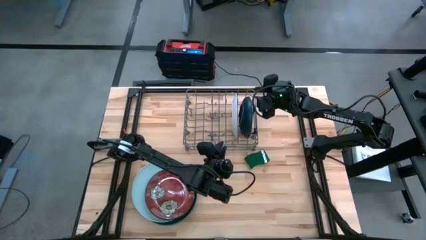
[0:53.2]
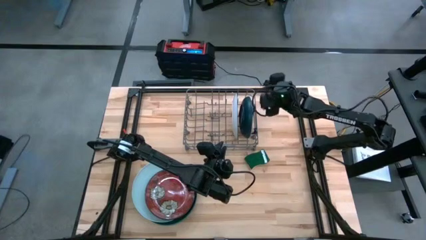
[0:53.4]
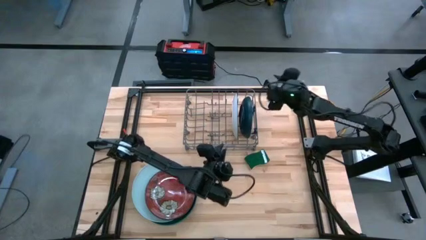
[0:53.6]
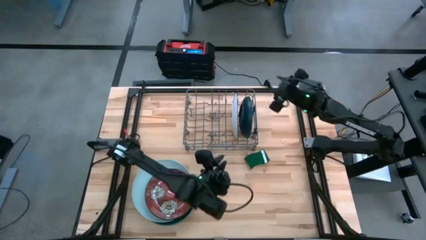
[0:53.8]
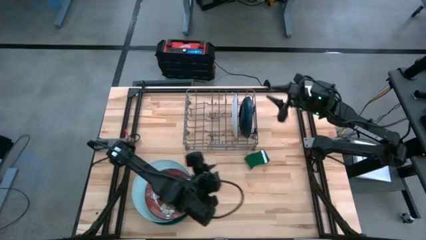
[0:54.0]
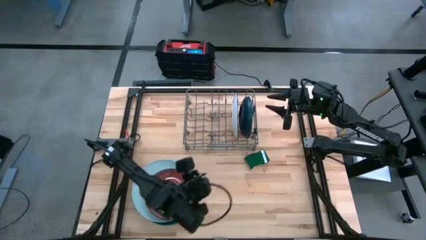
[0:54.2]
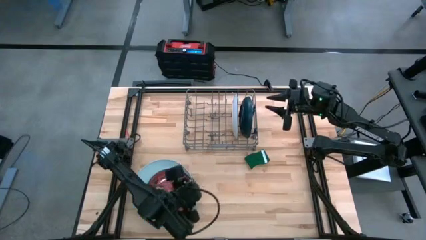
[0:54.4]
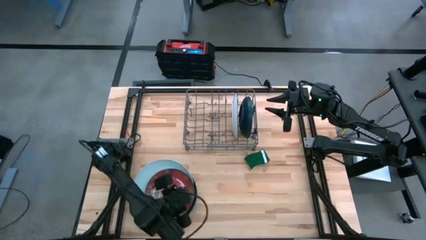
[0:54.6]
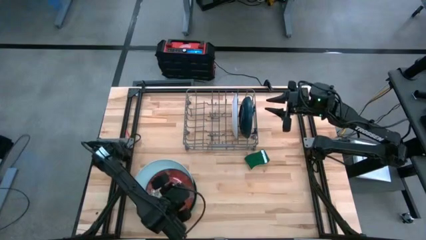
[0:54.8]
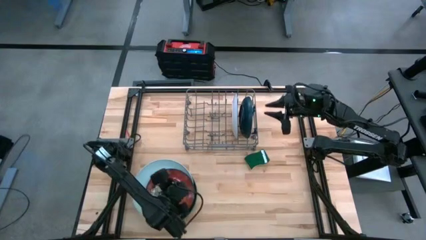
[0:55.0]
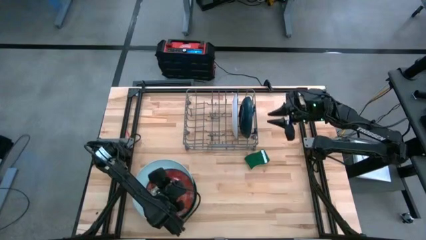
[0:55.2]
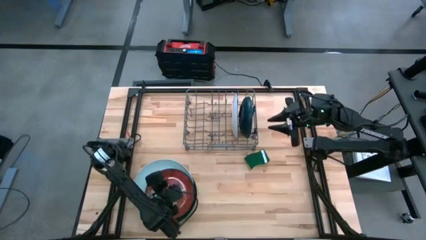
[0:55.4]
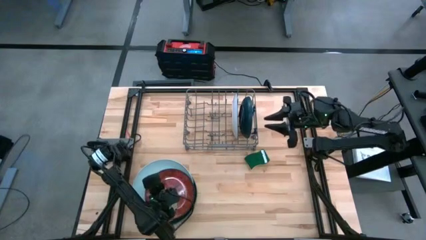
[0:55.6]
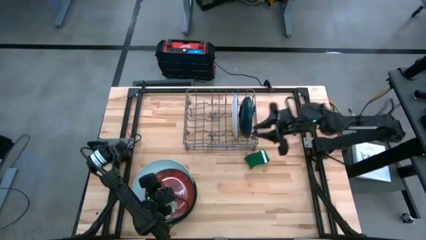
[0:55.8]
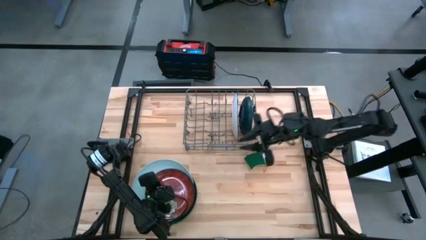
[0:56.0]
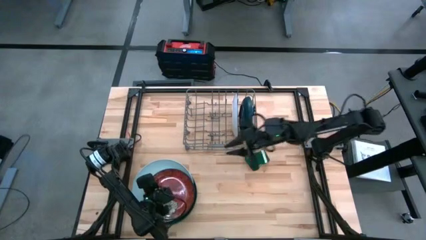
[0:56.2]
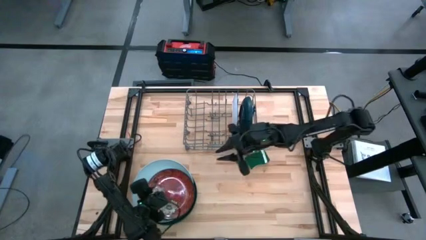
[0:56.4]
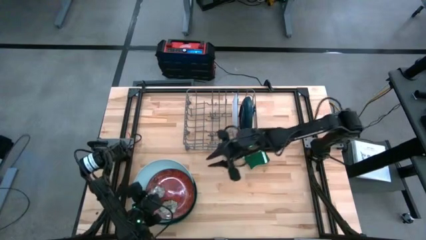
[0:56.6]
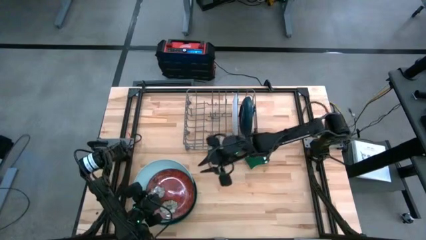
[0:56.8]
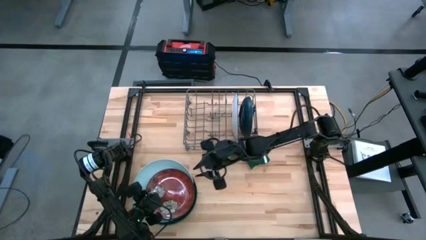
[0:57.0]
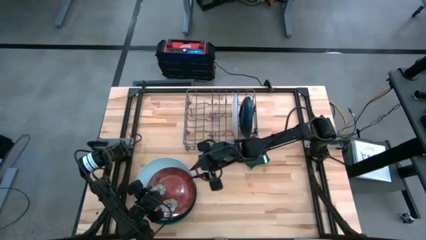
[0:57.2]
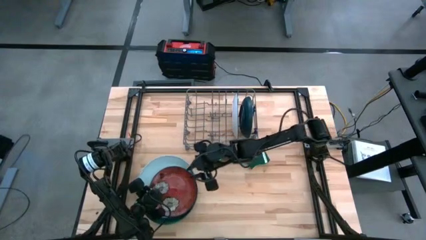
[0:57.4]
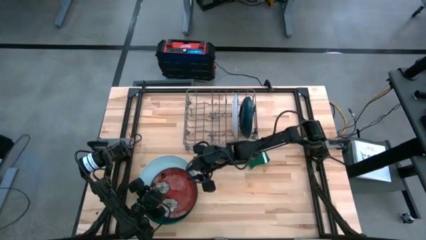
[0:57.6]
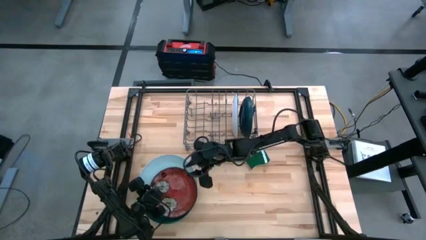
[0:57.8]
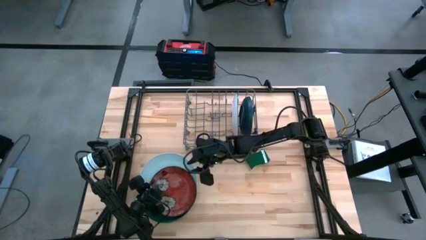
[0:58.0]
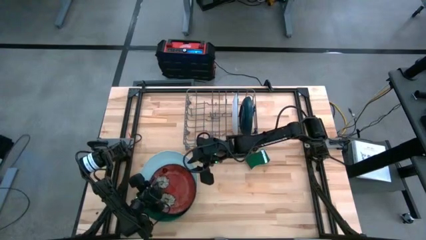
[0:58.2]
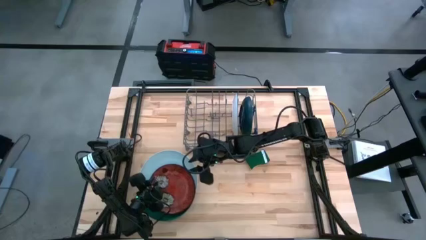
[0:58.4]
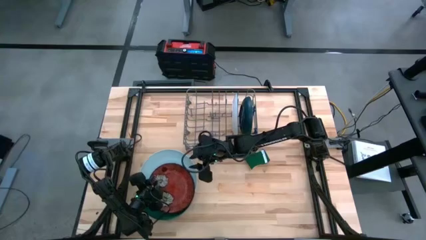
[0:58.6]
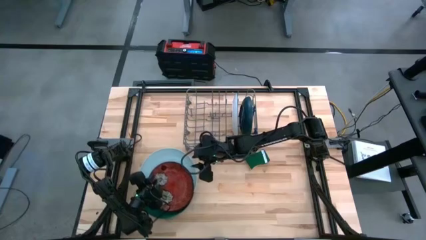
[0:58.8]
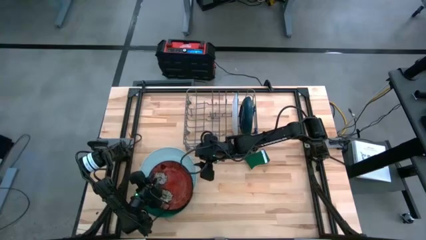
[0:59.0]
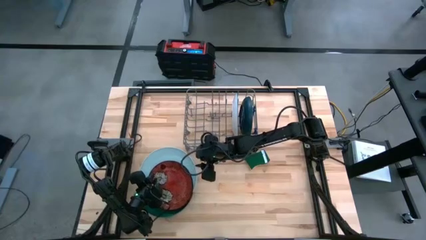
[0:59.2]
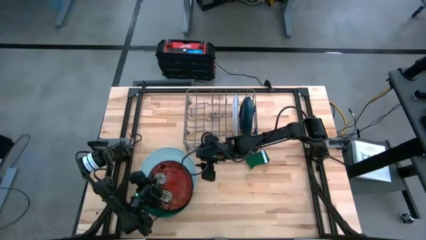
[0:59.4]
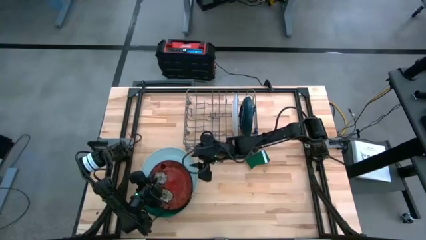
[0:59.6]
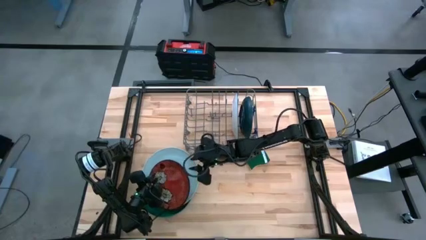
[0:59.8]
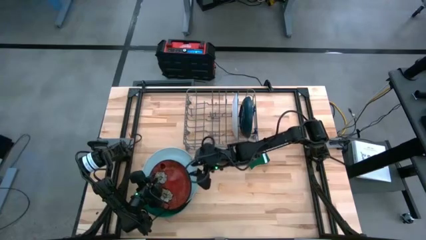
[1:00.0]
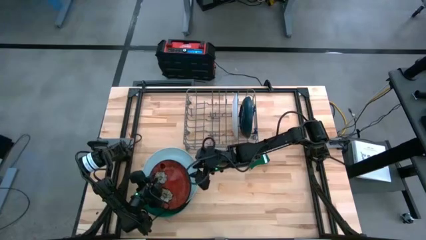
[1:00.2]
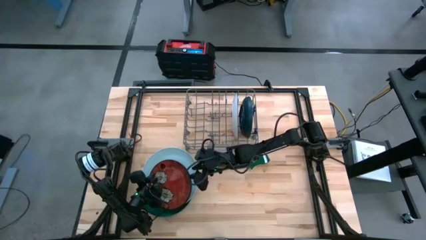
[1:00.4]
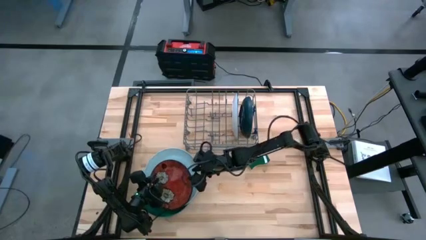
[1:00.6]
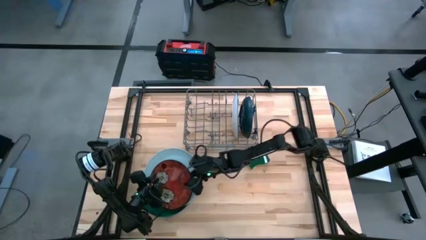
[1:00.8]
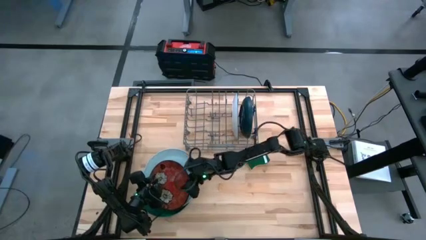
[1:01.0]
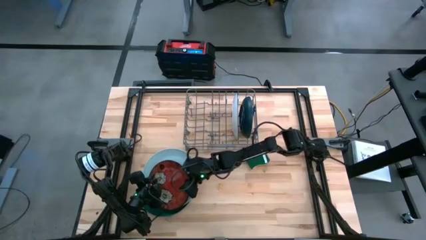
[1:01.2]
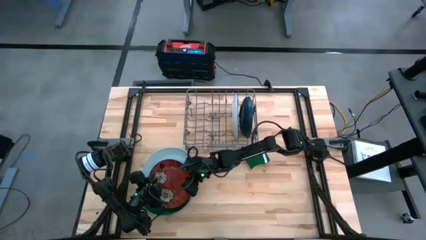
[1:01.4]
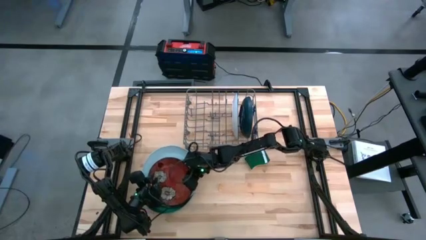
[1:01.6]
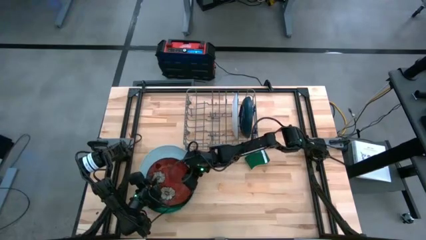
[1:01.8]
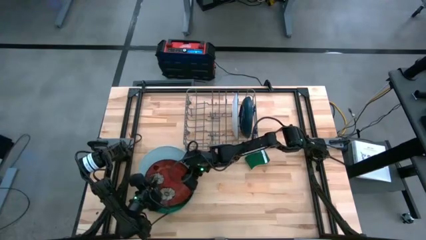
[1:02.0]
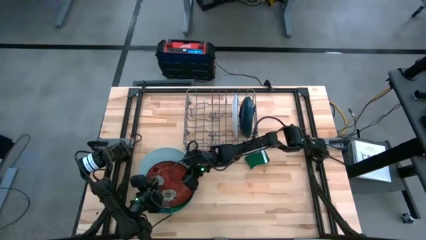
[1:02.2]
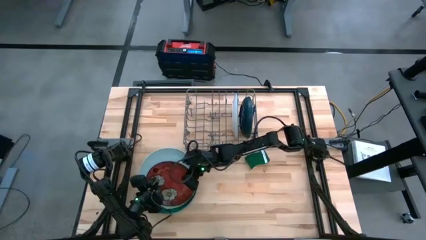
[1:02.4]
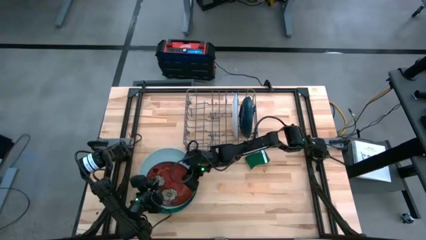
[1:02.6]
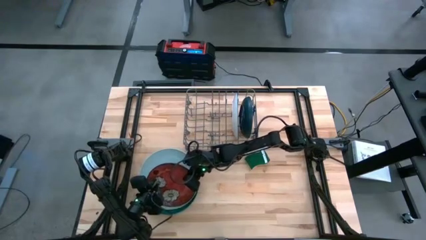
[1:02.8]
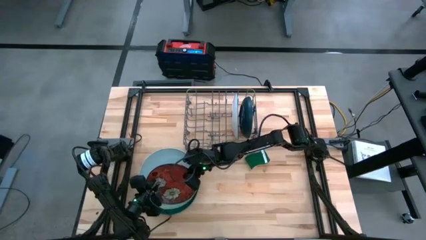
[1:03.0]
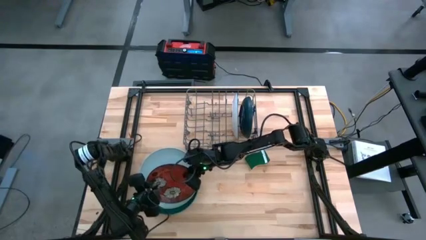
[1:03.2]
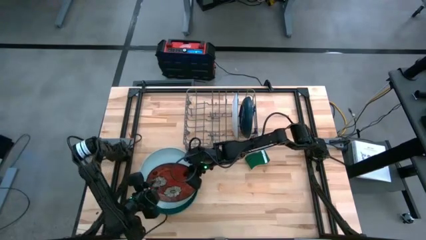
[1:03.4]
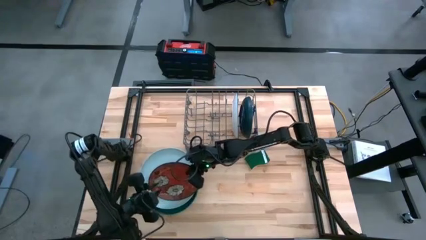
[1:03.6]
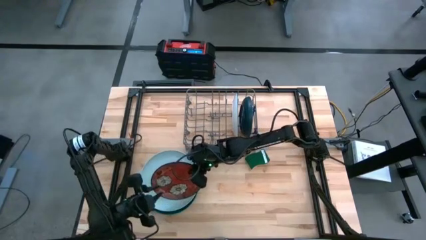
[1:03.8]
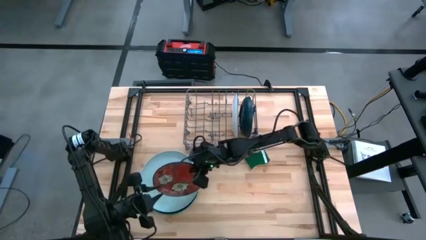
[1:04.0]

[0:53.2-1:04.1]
Task: Sort dishes
Put the red plate into the dish rack

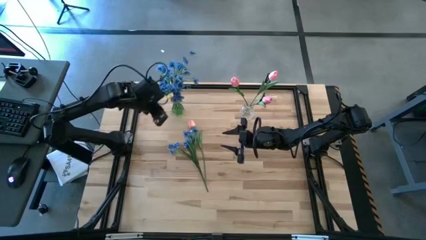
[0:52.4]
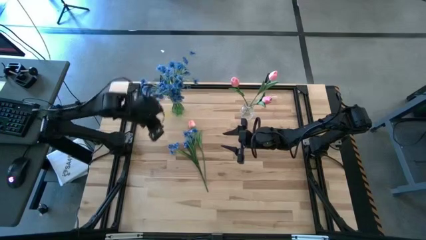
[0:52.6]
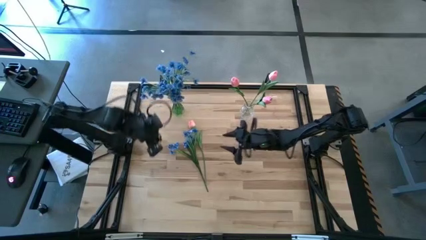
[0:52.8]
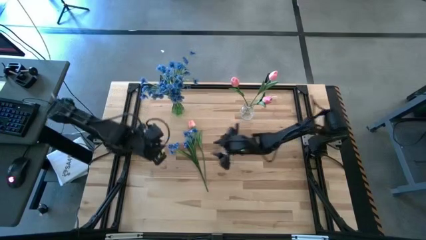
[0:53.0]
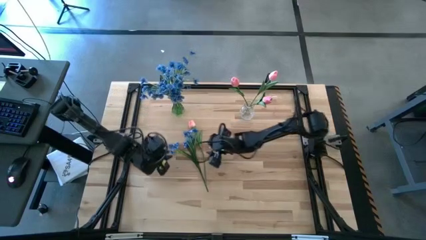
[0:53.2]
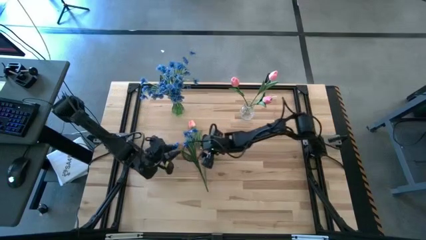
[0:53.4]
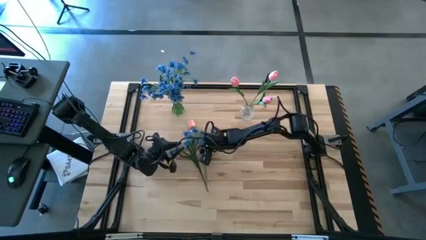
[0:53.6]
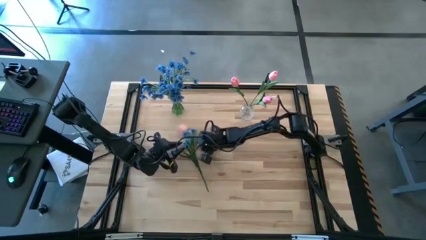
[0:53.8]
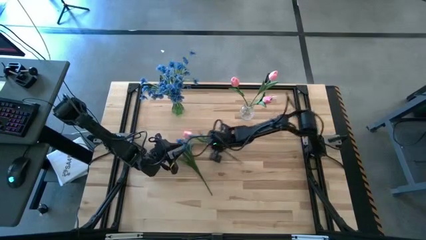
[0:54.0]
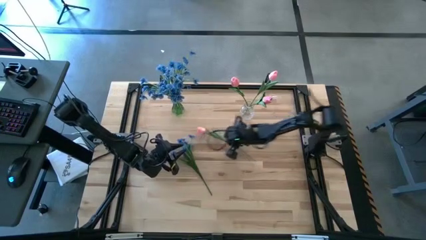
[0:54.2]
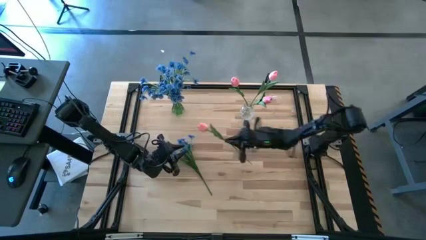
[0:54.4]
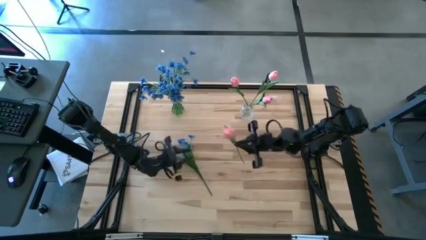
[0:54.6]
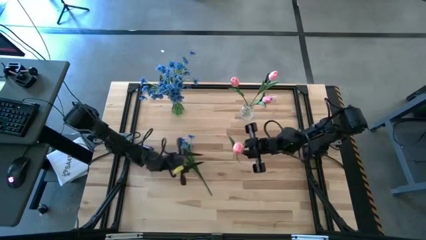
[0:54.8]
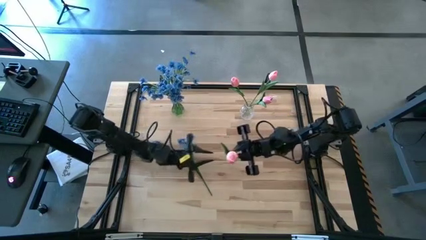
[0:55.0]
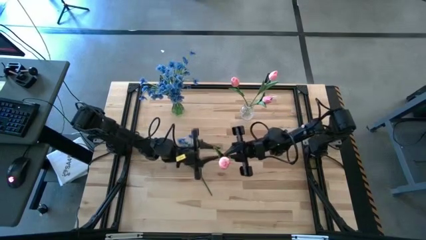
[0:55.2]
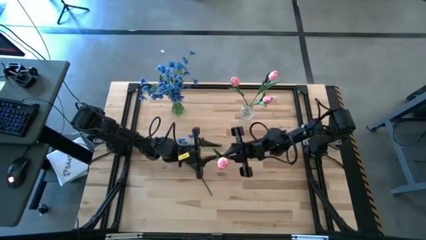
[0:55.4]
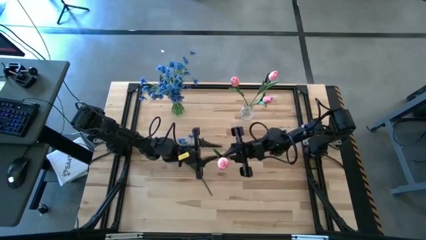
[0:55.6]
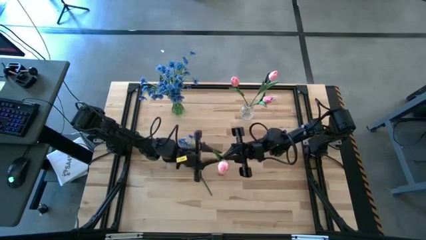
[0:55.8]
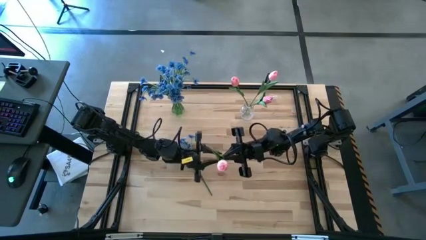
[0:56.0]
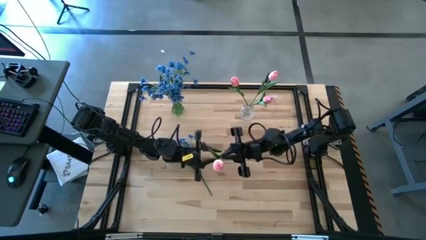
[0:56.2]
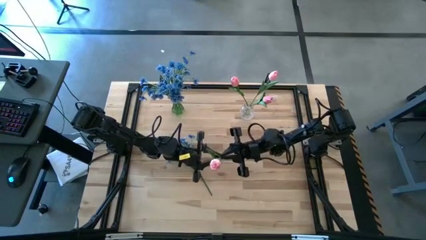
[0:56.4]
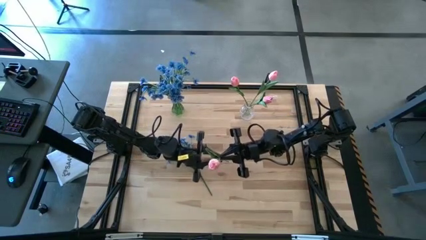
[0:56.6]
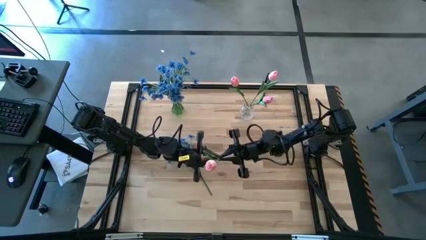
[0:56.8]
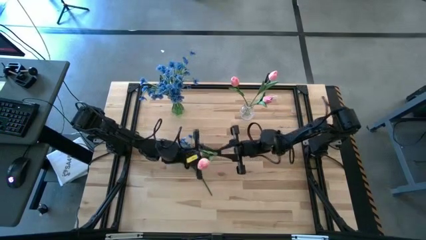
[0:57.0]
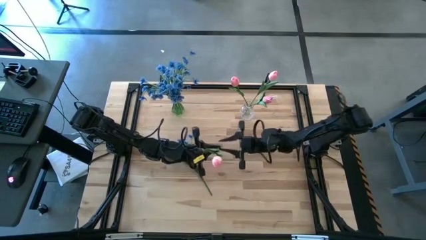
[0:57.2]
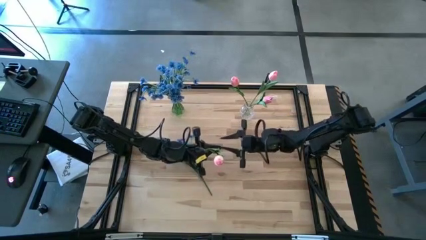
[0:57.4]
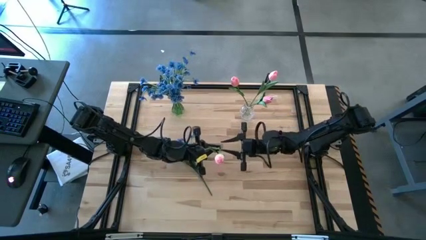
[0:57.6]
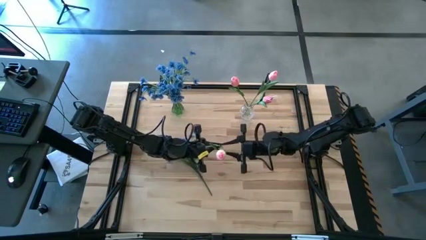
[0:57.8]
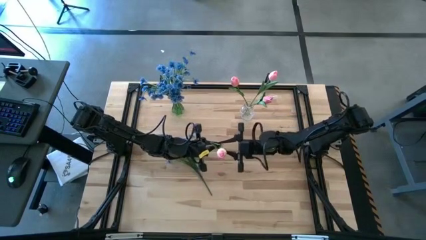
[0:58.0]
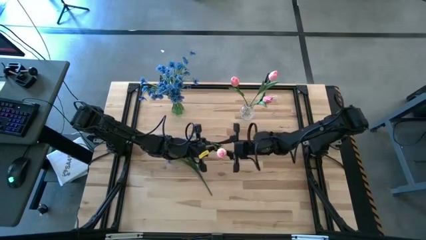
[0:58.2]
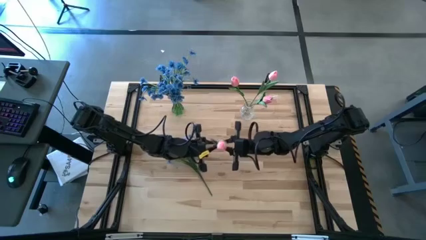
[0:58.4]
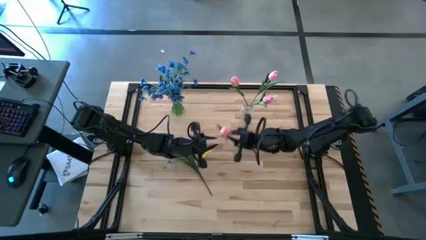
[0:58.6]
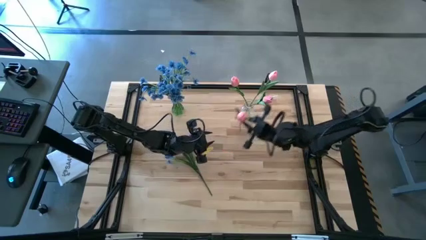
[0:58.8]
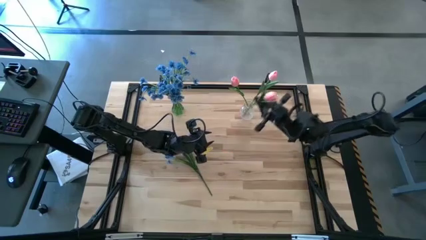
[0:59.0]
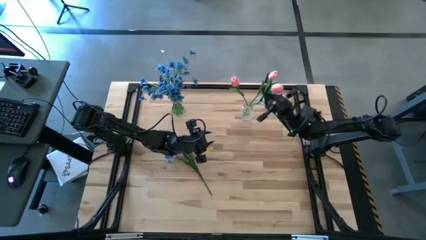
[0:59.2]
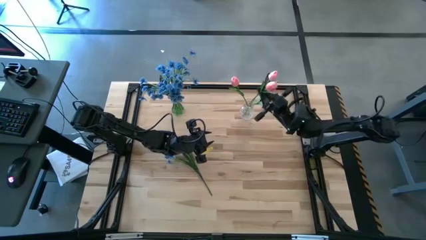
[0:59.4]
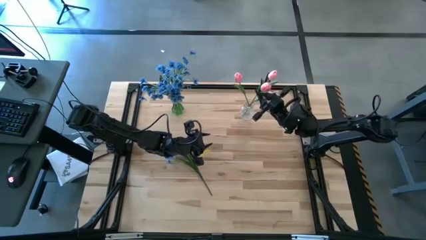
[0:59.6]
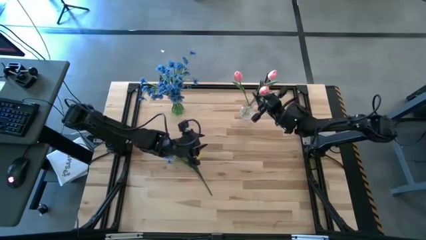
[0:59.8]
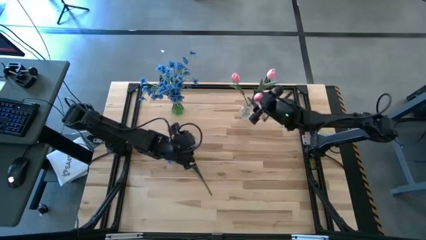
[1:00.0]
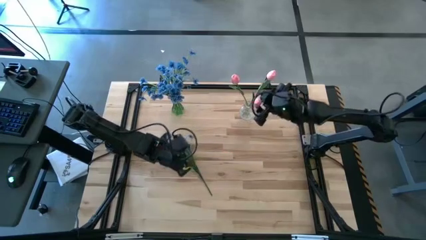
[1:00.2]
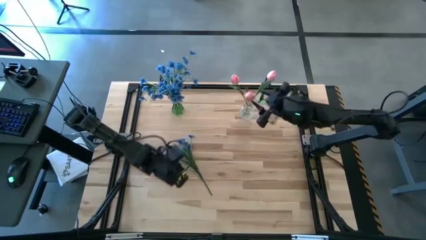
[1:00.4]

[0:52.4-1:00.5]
Task: Sort flowers into vase by color
Put the pink flower into the transparent vase
